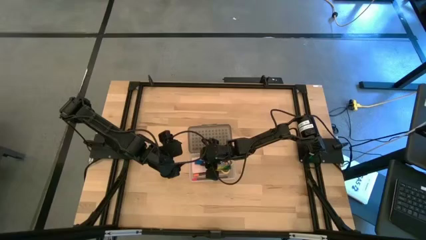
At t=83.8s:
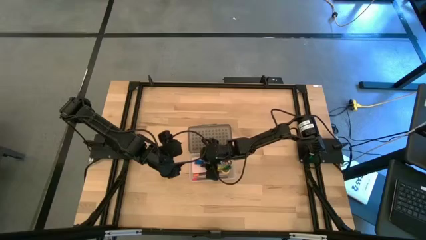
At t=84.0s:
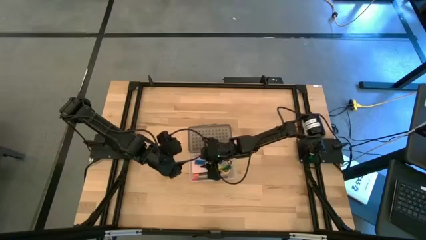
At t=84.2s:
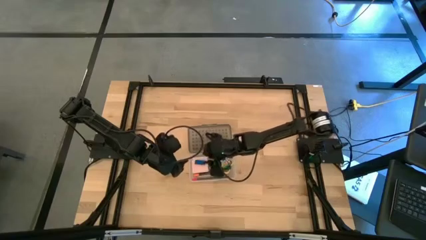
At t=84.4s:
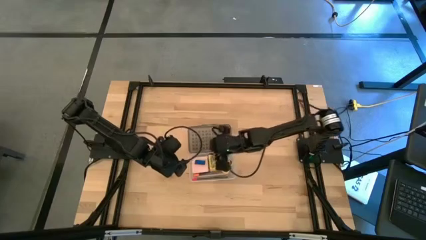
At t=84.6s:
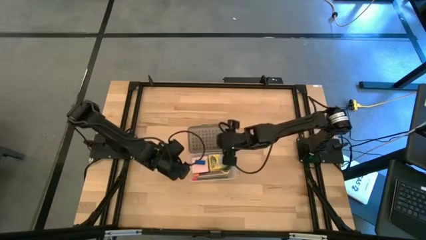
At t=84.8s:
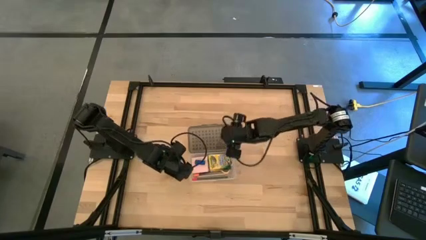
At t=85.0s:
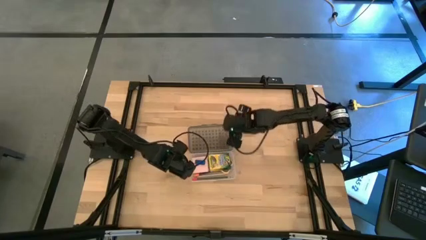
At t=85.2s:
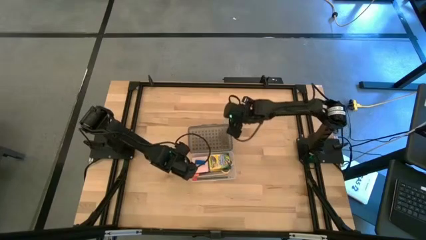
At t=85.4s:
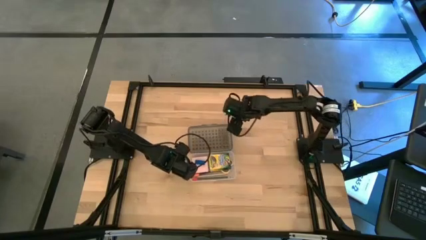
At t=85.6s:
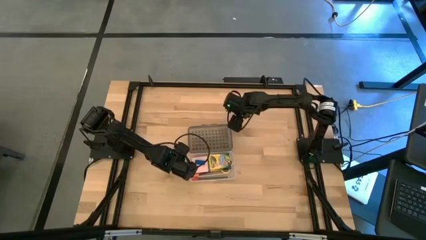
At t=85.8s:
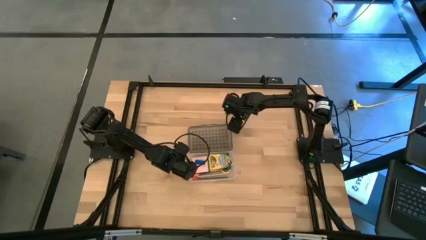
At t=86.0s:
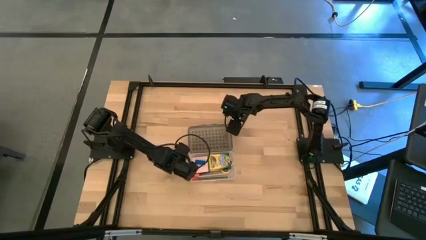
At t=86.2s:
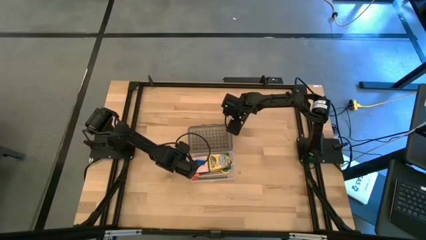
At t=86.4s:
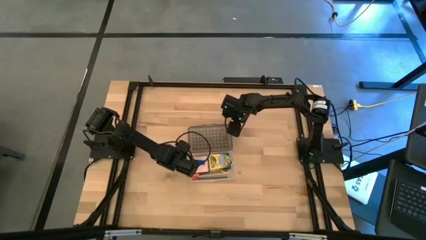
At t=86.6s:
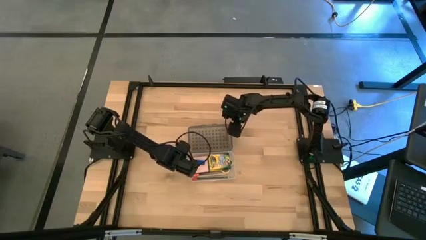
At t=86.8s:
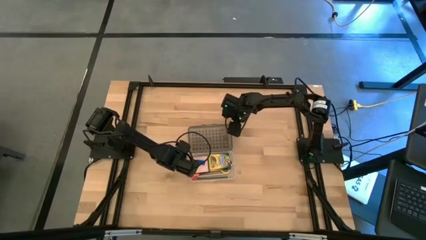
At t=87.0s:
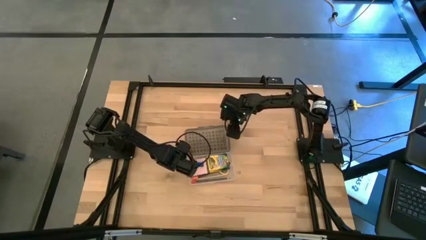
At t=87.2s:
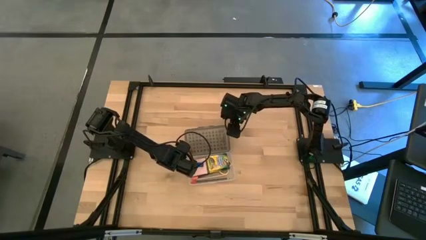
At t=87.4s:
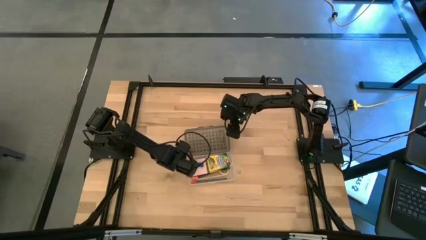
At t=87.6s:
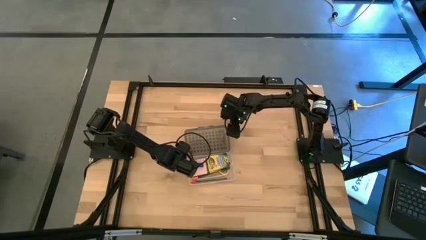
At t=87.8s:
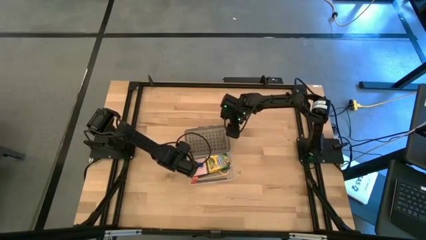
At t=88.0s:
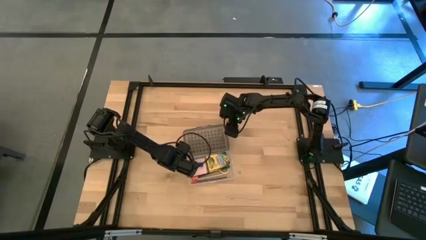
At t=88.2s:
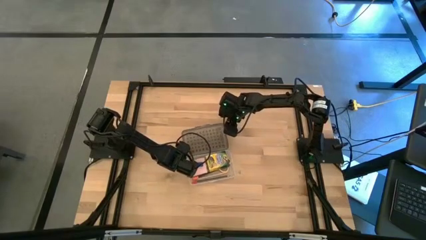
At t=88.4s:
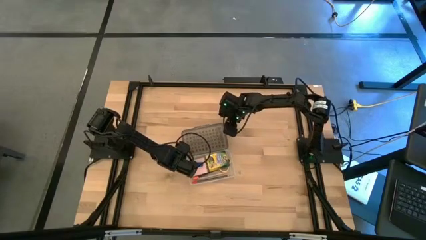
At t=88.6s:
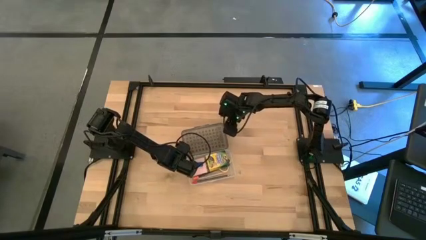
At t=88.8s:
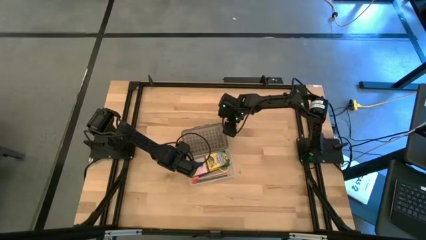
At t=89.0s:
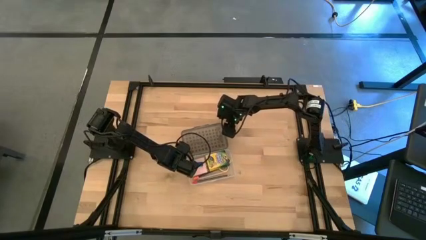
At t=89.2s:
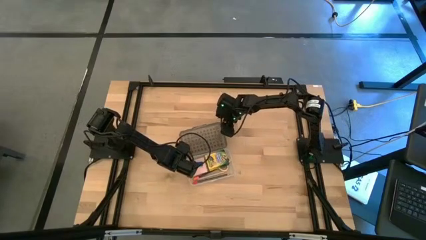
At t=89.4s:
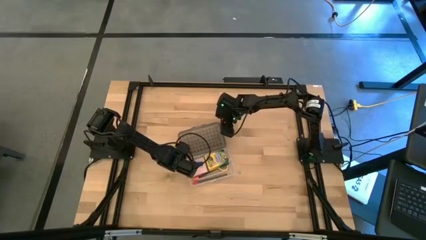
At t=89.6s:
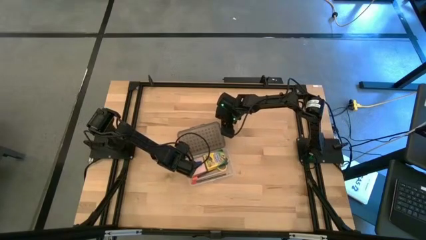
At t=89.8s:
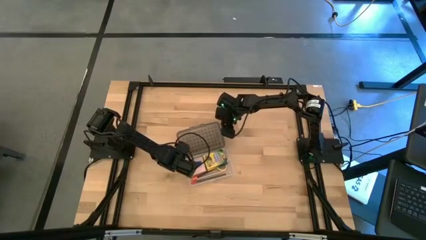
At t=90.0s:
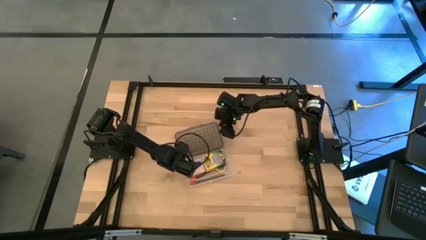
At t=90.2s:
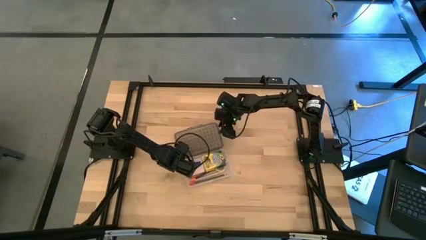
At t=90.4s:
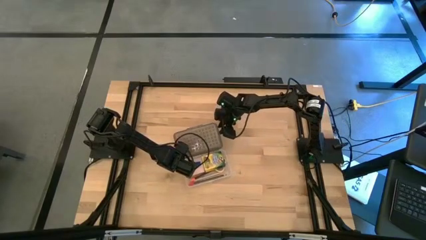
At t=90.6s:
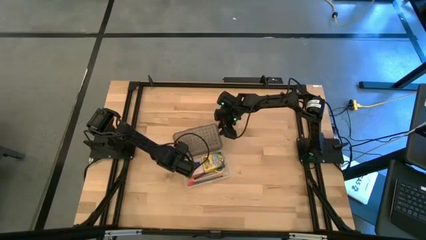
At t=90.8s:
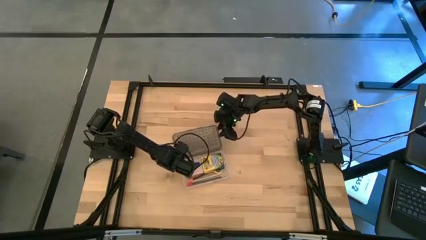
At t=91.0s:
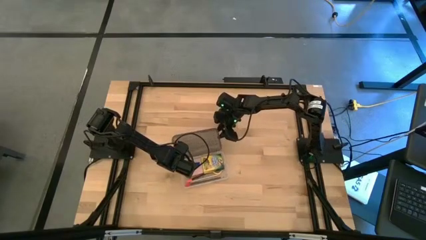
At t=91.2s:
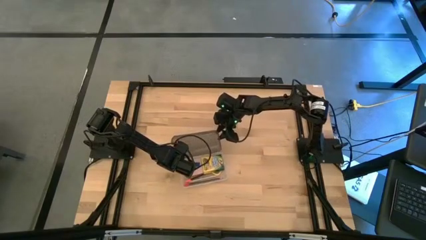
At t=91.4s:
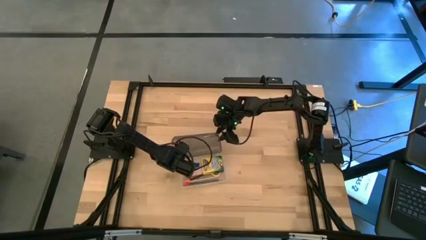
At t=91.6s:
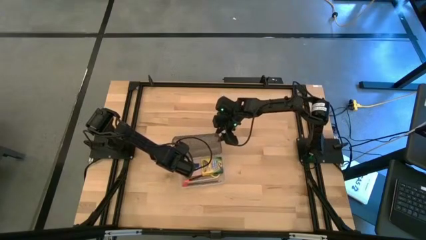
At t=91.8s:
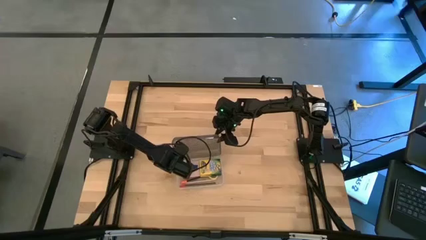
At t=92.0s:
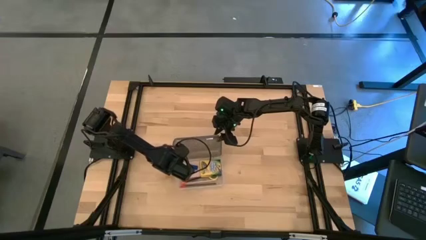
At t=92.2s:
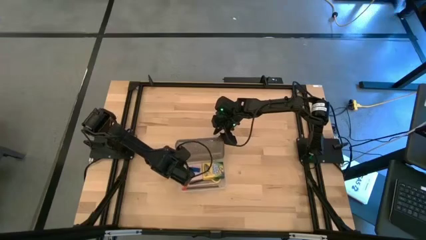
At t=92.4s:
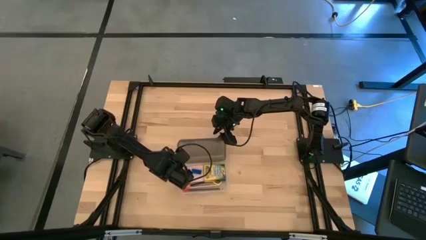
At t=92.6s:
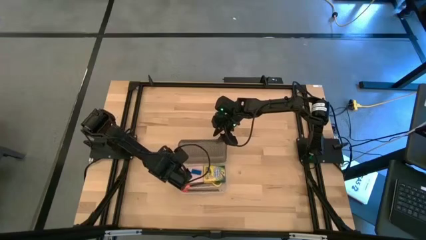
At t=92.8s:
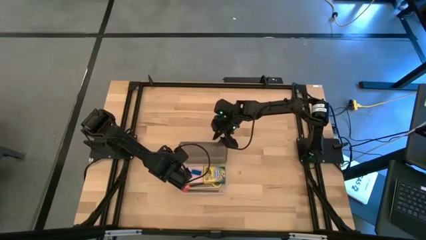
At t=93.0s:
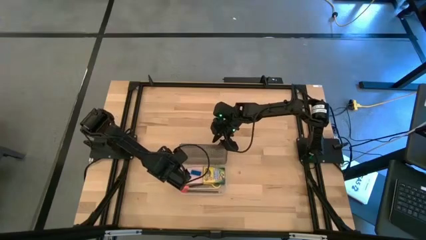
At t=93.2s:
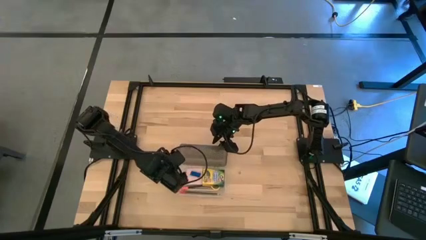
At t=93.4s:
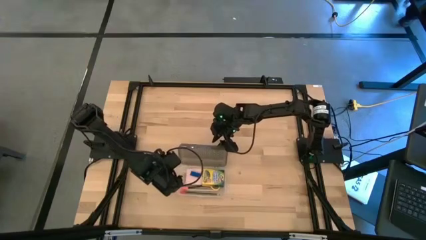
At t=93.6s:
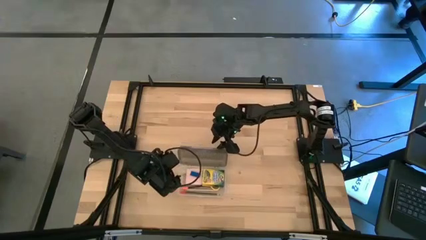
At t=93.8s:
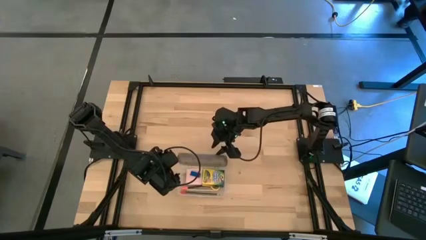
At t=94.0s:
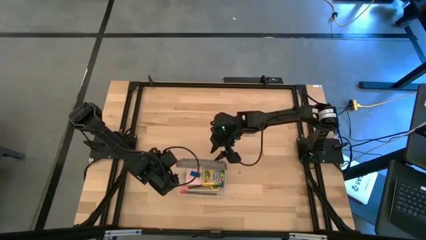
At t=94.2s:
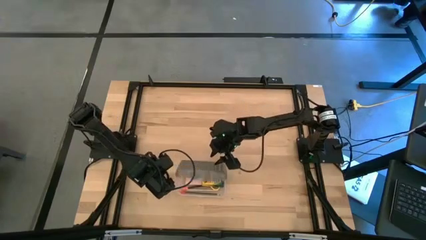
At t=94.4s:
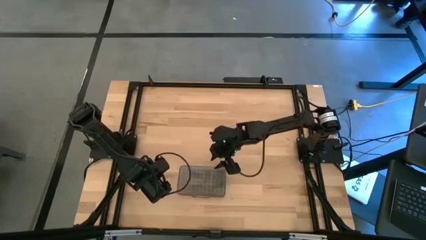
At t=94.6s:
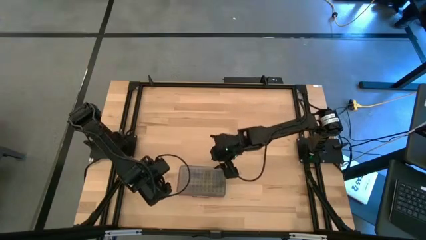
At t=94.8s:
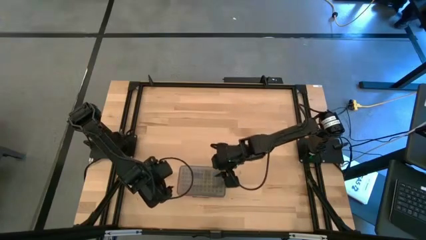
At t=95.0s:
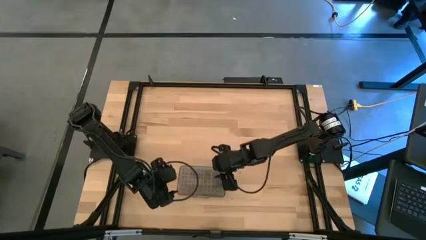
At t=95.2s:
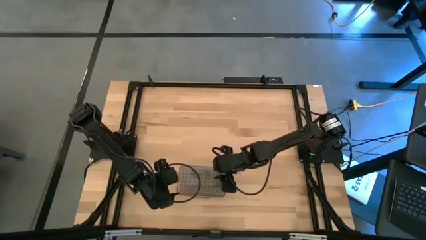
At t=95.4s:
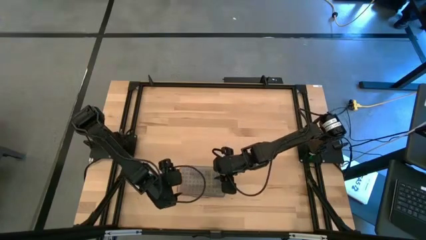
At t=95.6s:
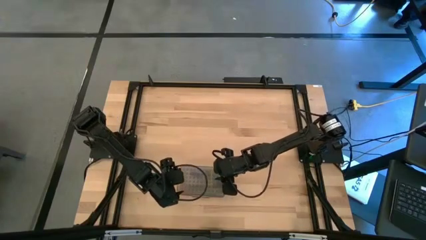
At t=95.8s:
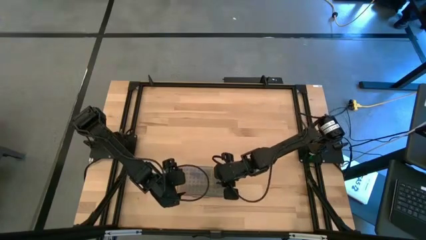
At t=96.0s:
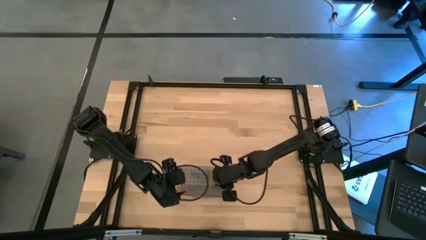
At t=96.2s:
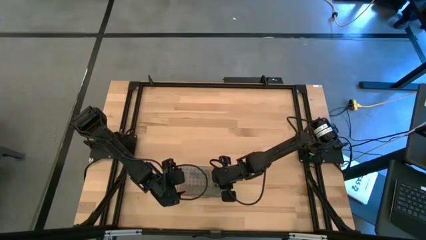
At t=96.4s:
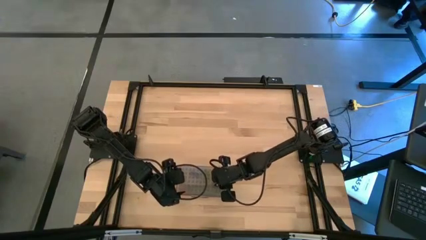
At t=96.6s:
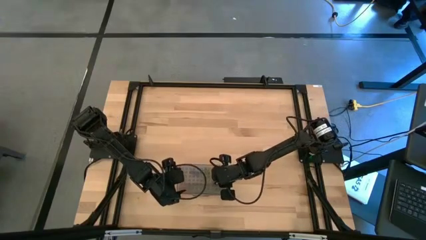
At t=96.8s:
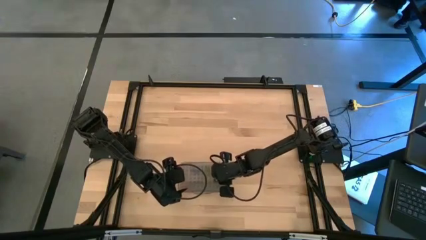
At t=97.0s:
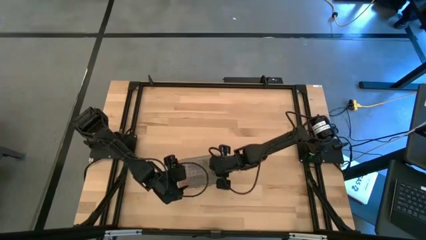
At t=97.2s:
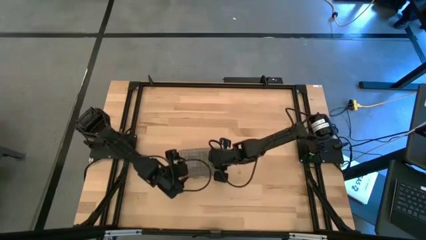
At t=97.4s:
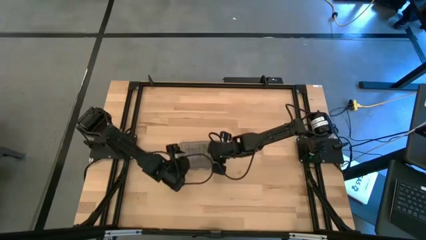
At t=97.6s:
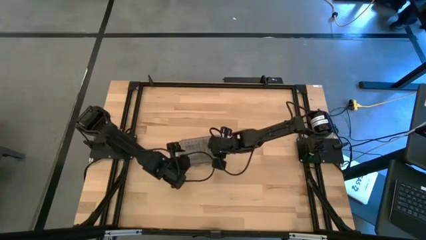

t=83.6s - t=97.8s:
Task: Pack school essentials
Close the black supply box

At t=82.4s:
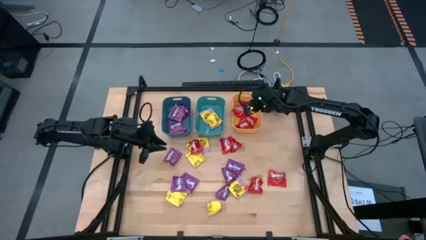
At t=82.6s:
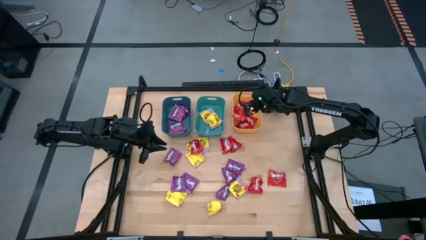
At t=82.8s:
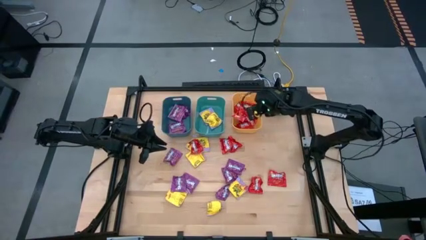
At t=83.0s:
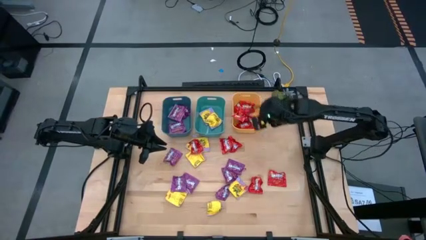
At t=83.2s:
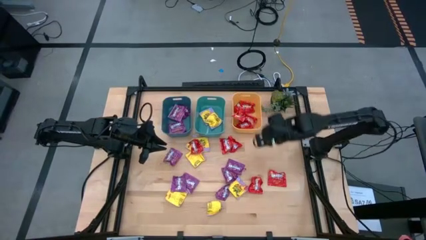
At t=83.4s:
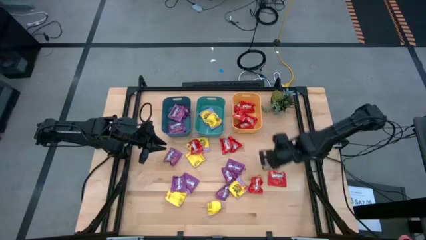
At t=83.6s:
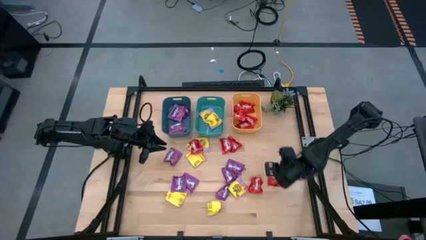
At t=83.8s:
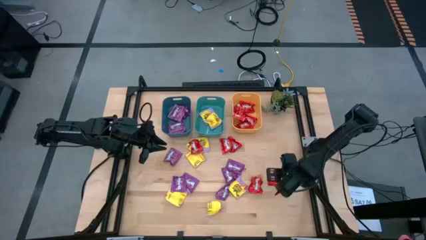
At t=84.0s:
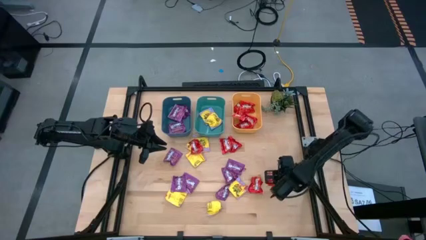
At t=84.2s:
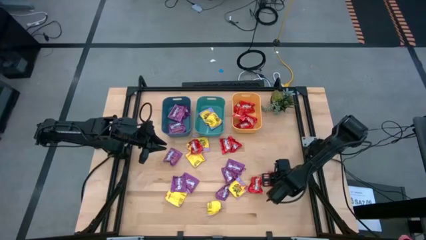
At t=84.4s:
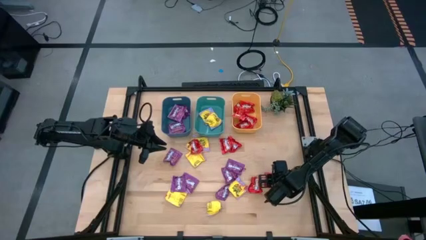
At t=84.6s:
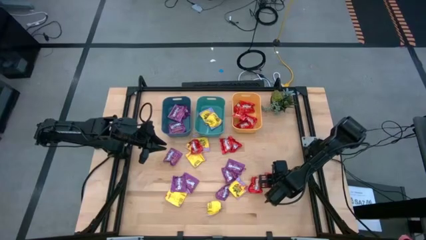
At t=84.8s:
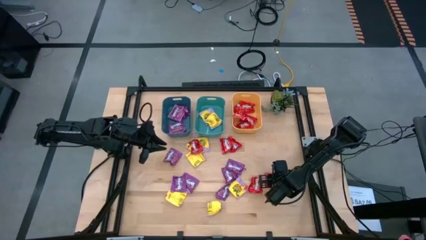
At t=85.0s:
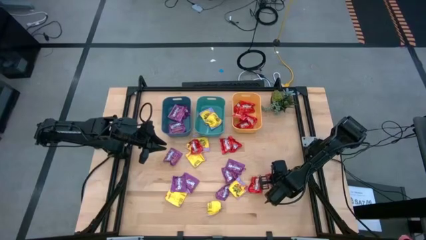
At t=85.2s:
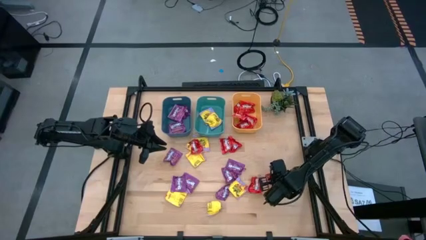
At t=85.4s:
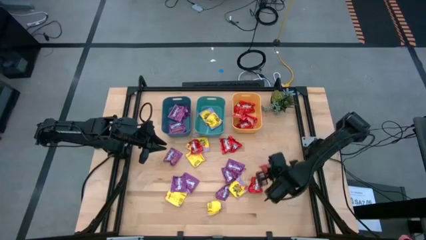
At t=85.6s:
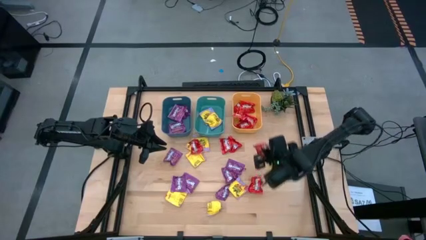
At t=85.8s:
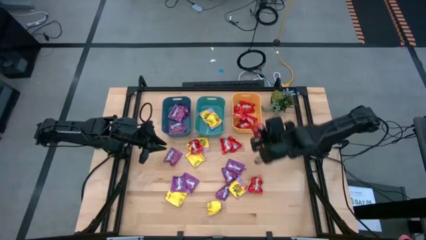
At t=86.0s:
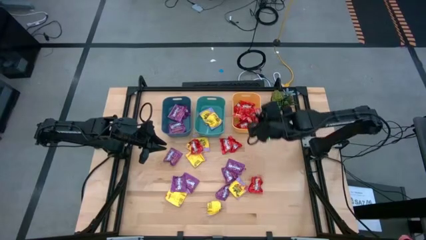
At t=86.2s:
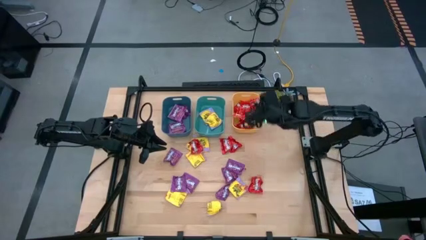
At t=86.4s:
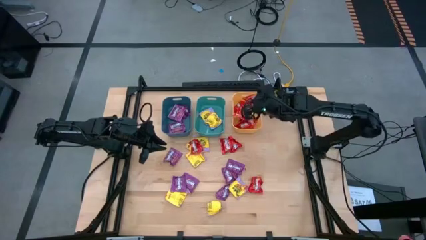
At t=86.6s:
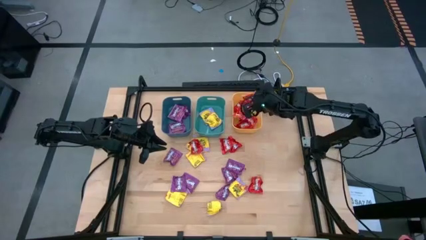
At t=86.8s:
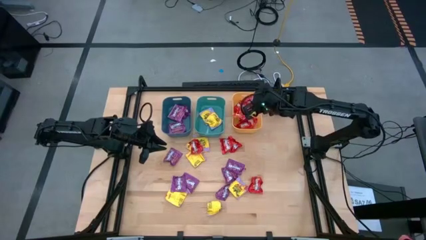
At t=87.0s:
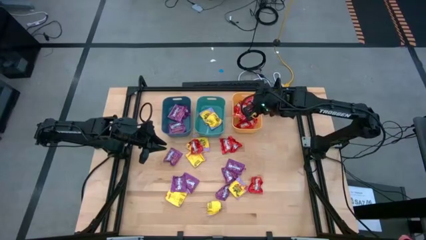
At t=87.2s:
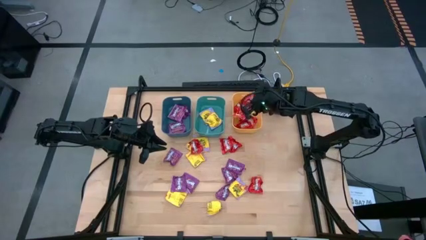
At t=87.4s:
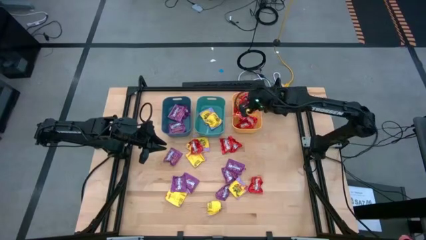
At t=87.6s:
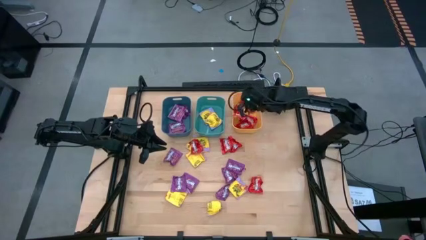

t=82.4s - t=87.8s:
Task: Sort candy
Put the red candy into the yellow bin
